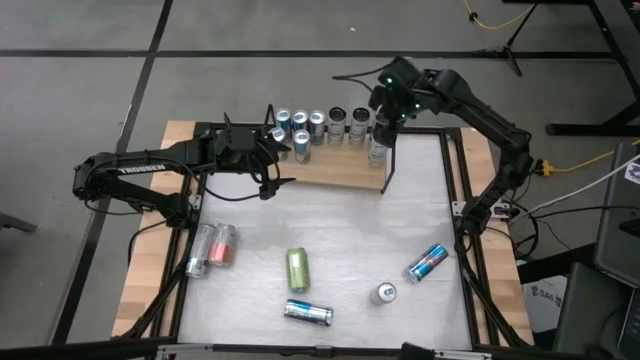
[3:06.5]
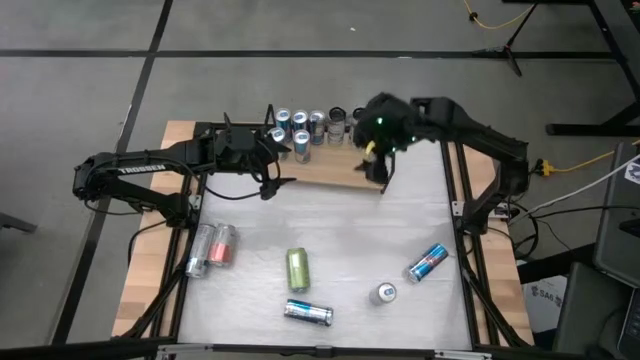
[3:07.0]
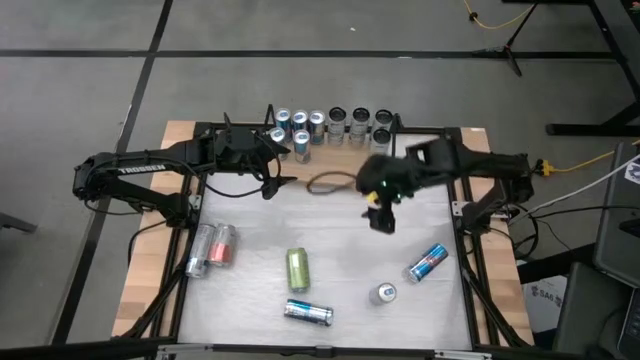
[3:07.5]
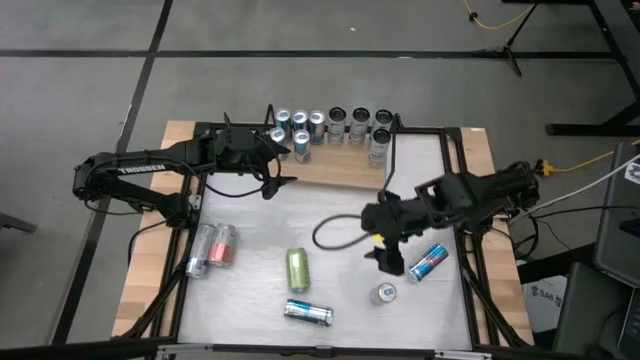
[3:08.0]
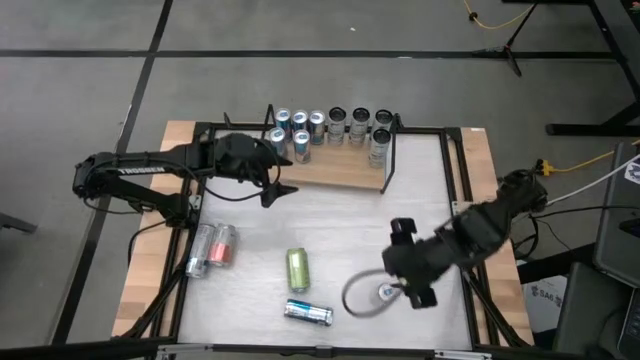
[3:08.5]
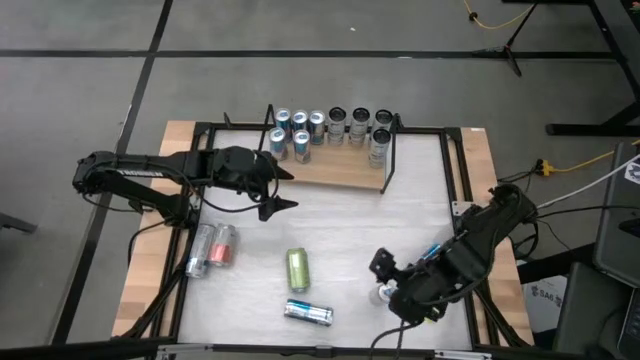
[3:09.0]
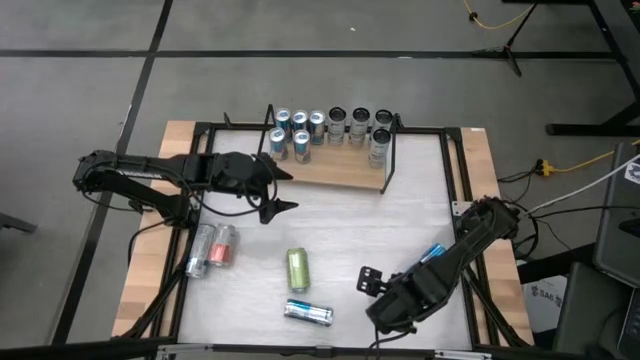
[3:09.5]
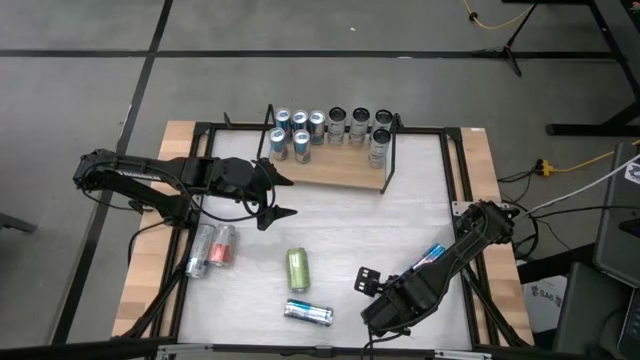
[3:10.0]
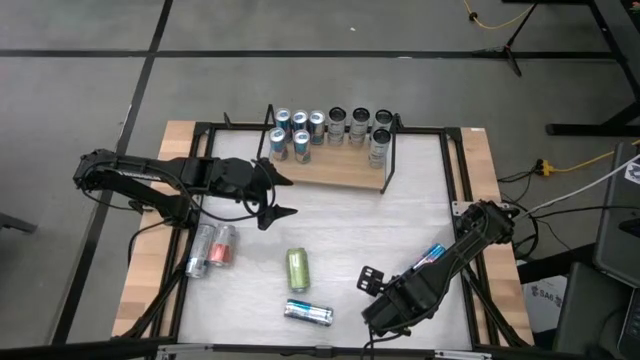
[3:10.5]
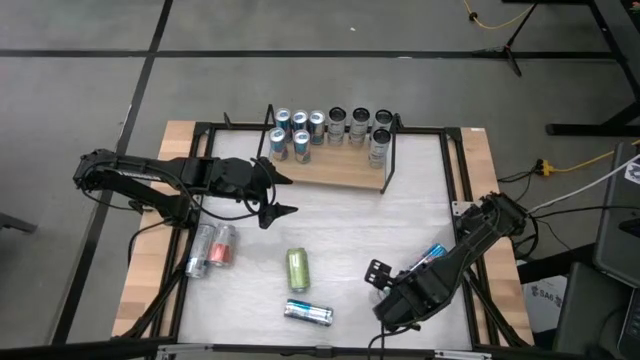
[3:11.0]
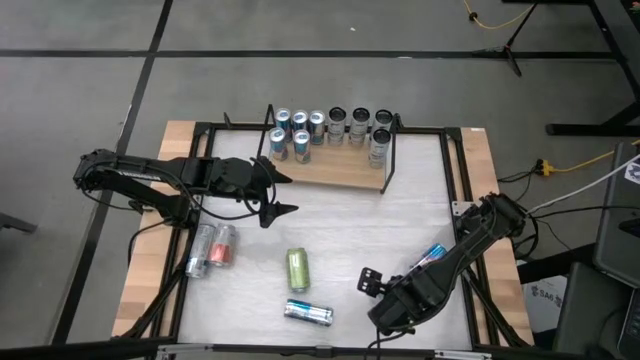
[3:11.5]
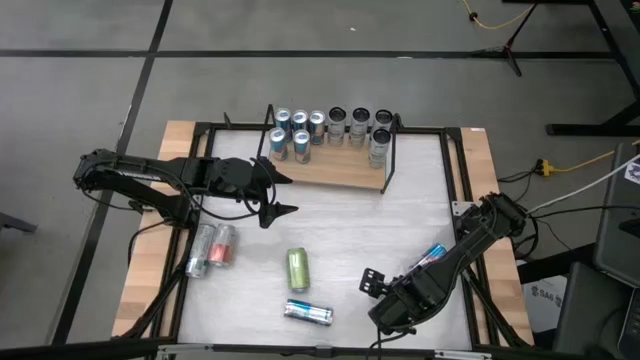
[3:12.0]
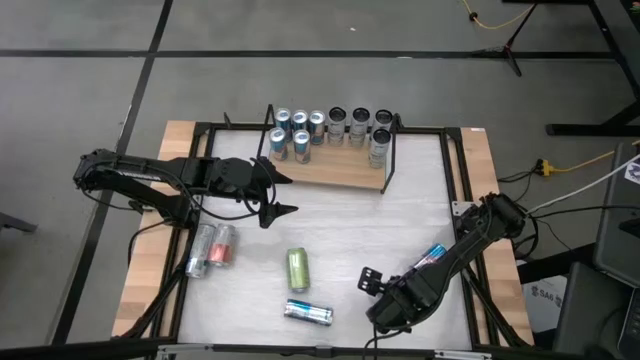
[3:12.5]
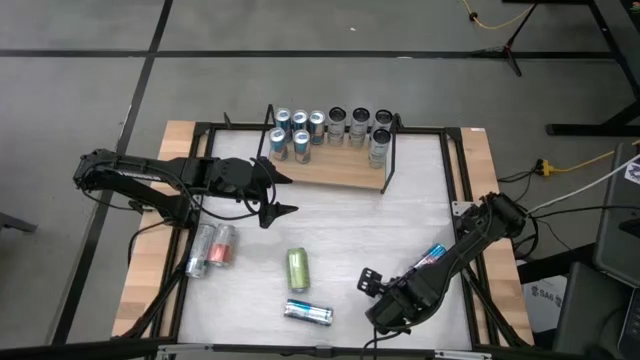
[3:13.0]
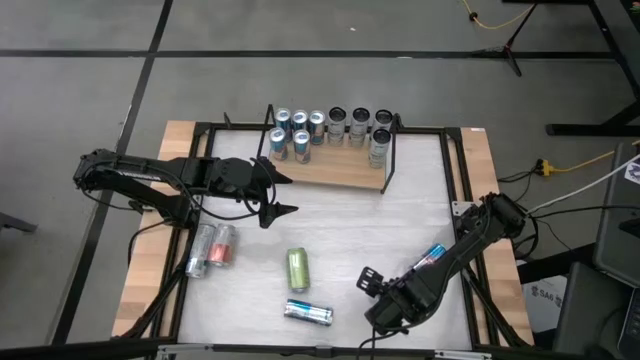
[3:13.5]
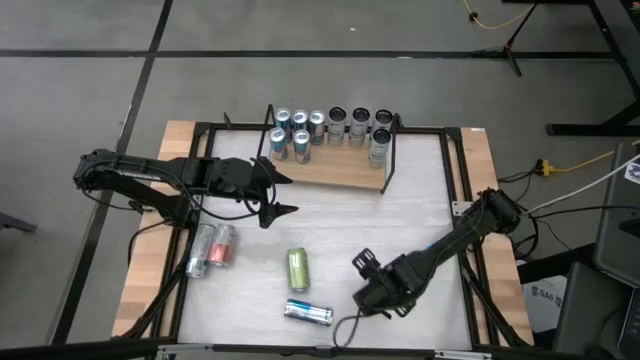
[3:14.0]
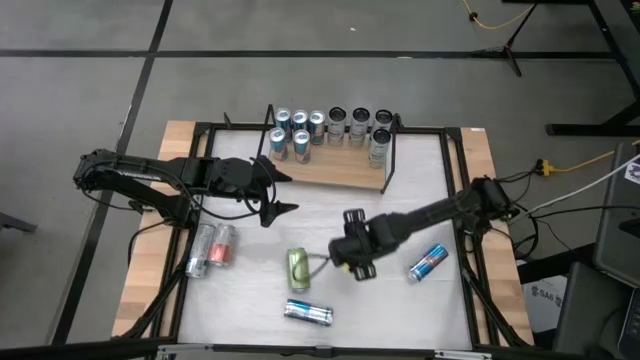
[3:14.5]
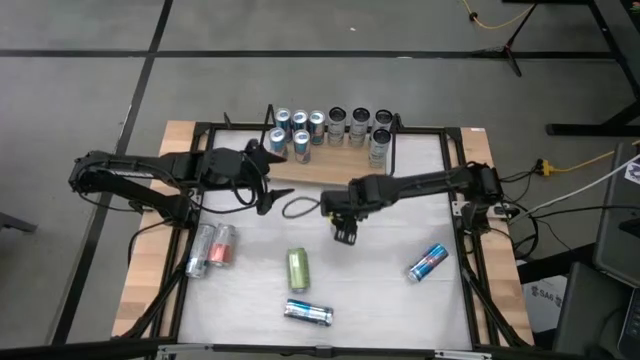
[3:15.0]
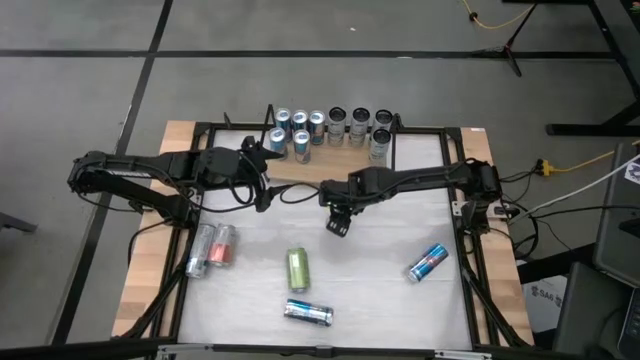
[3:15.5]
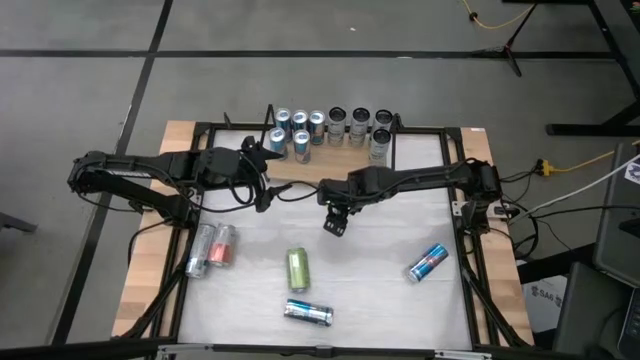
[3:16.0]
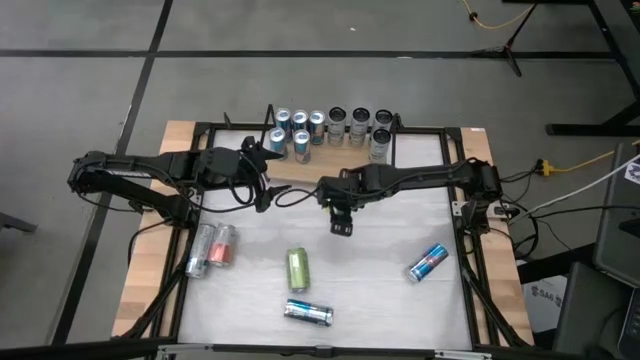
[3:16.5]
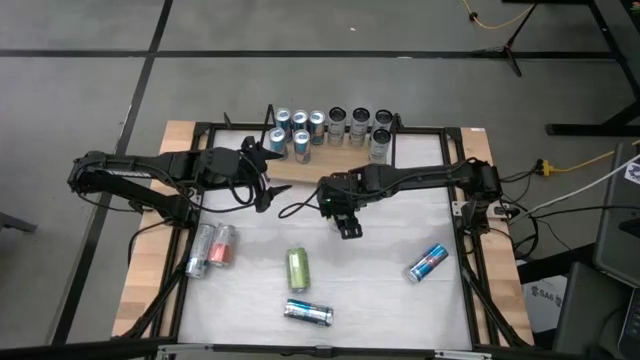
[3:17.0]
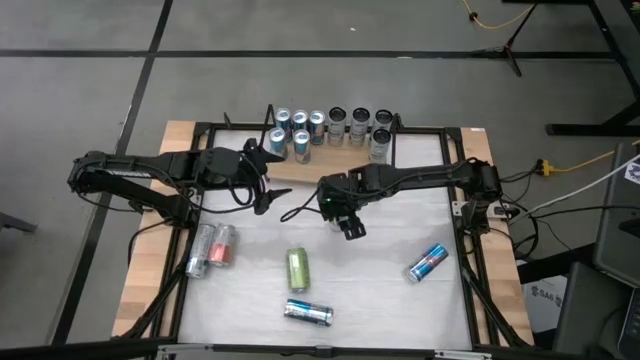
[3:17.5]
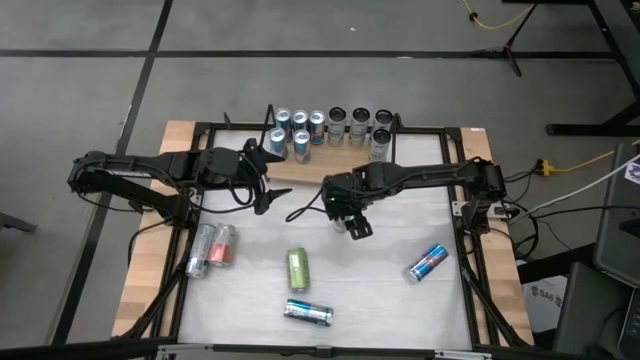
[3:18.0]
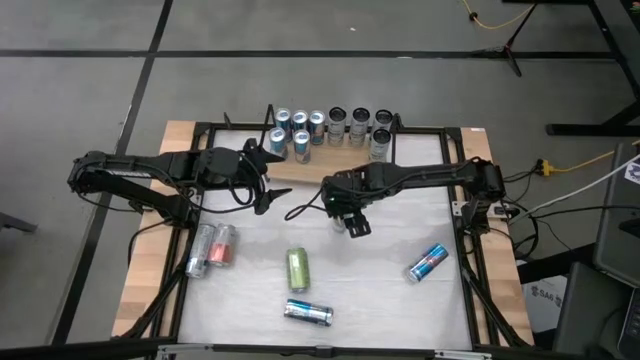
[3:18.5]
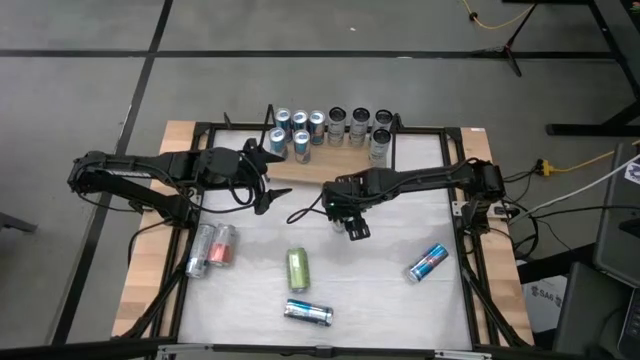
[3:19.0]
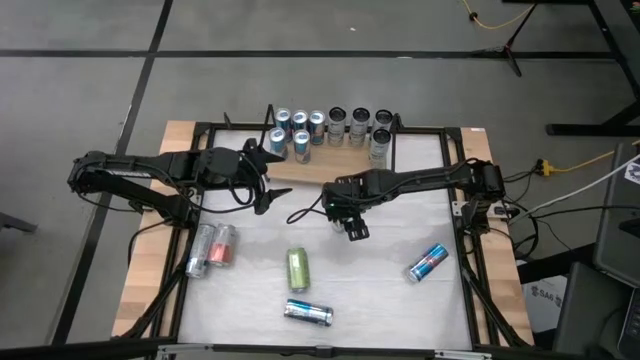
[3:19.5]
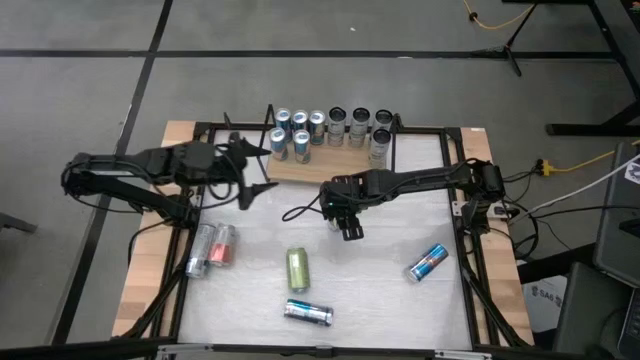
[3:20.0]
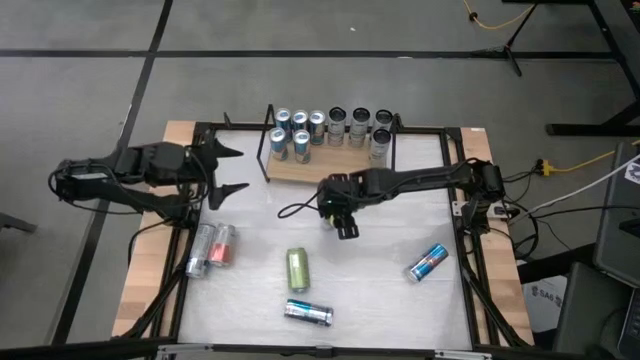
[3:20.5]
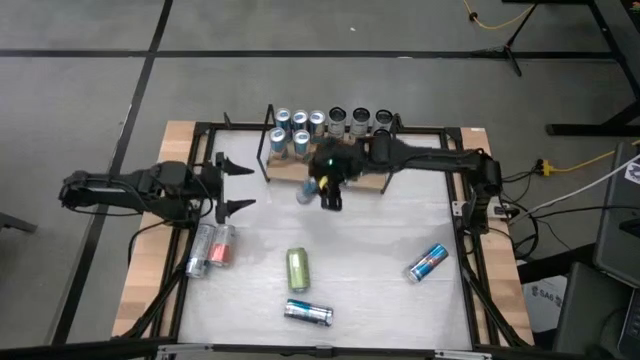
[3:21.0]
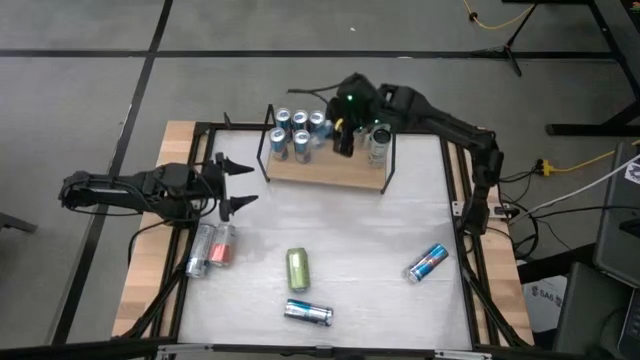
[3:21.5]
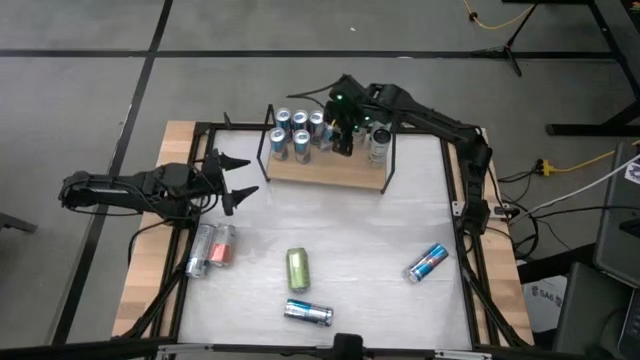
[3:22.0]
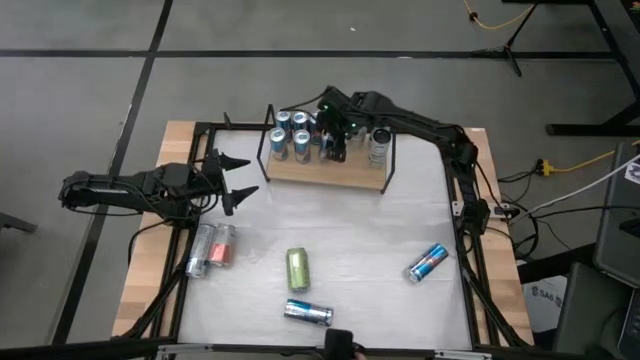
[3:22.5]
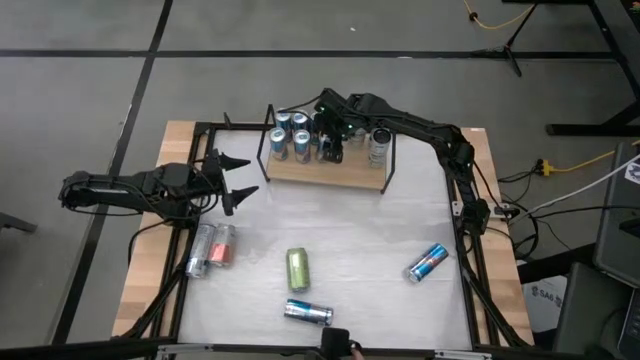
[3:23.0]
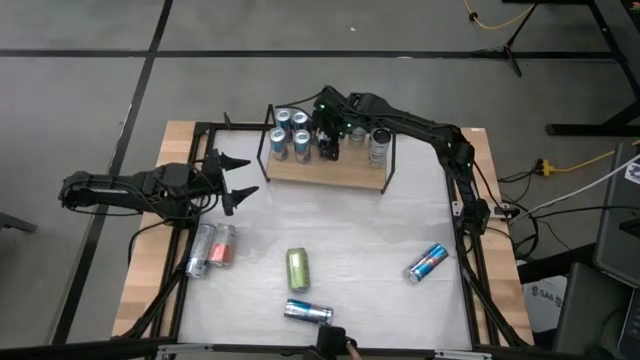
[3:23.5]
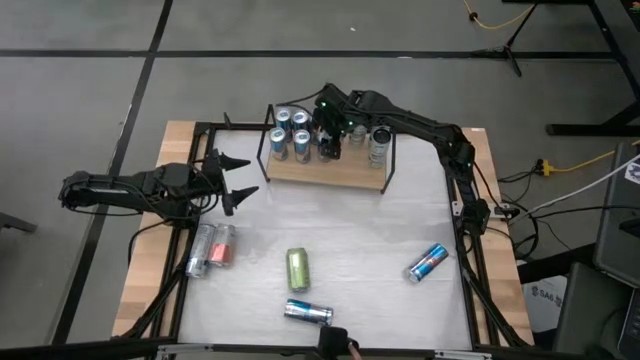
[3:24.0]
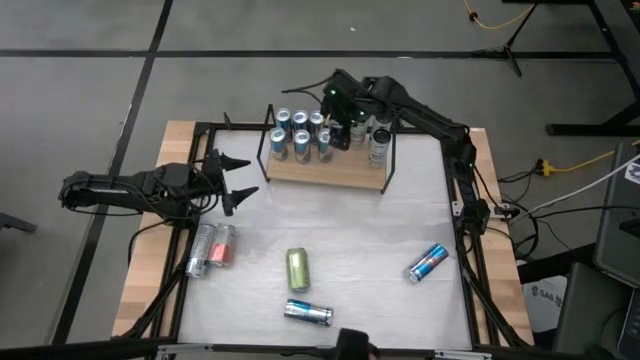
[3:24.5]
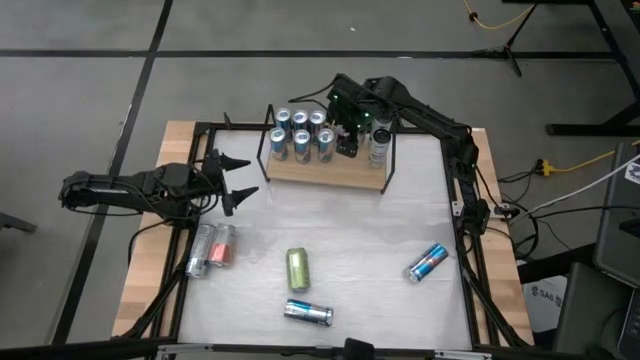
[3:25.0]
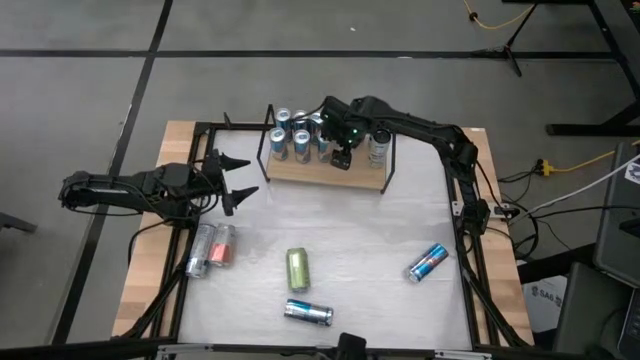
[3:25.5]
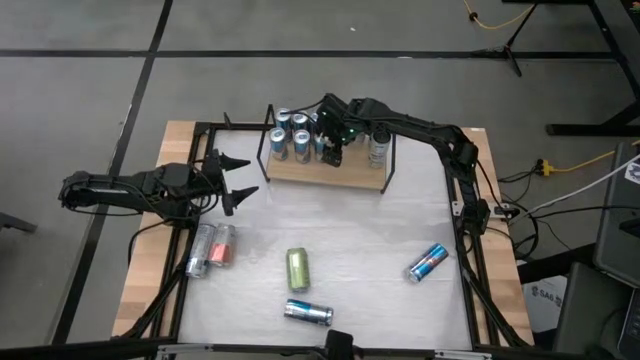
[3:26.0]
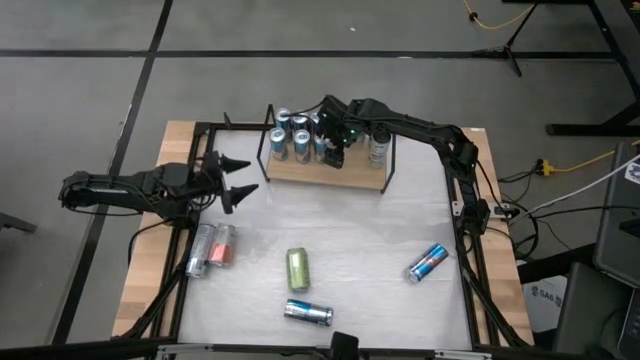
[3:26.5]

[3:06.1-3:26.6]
Task: Place canned beverage on shelf
Put the blue soda can on the shelf aligned with the other blue soda can

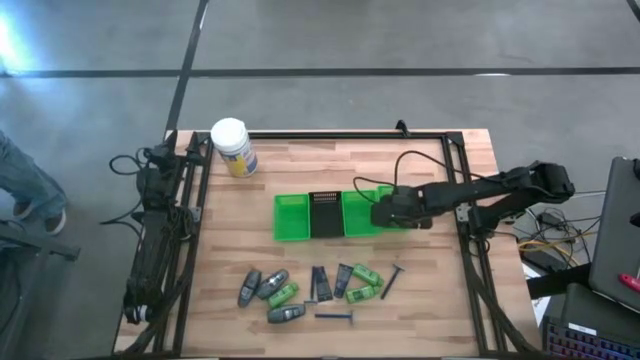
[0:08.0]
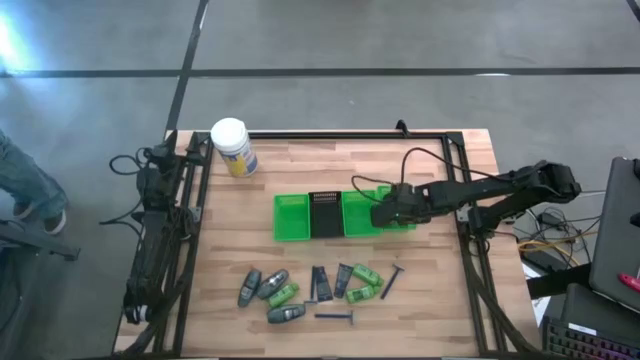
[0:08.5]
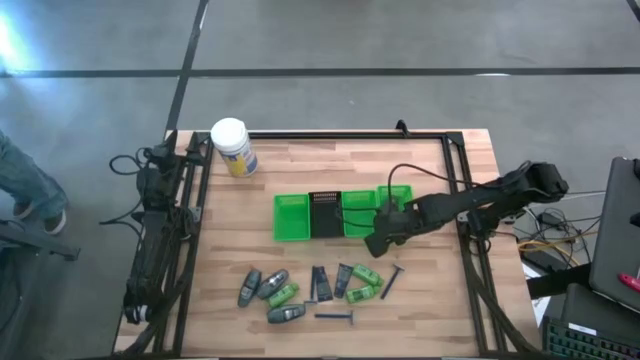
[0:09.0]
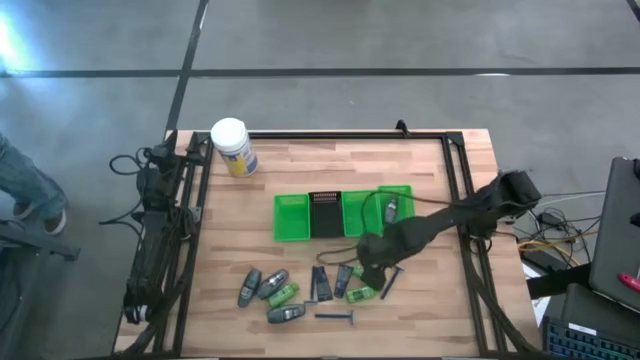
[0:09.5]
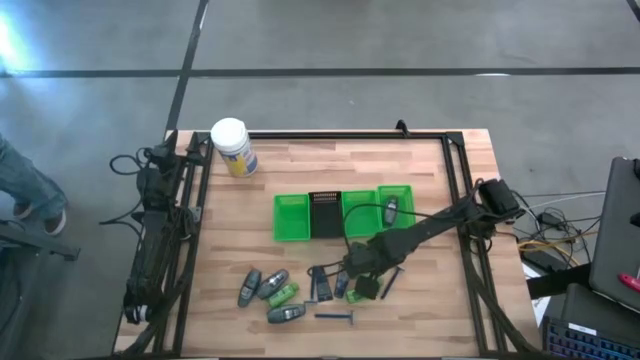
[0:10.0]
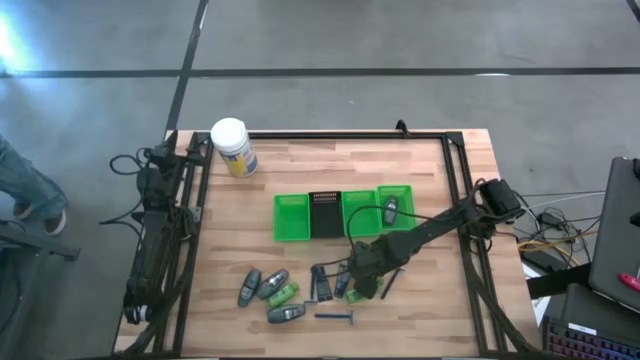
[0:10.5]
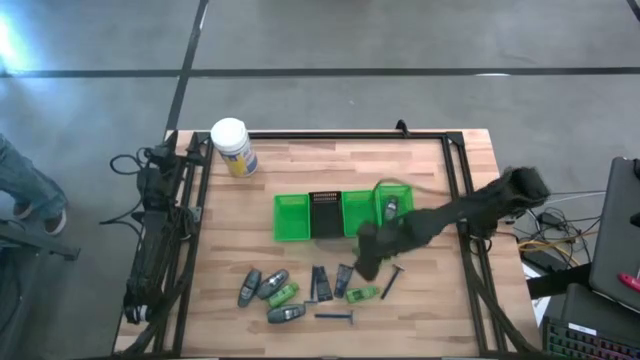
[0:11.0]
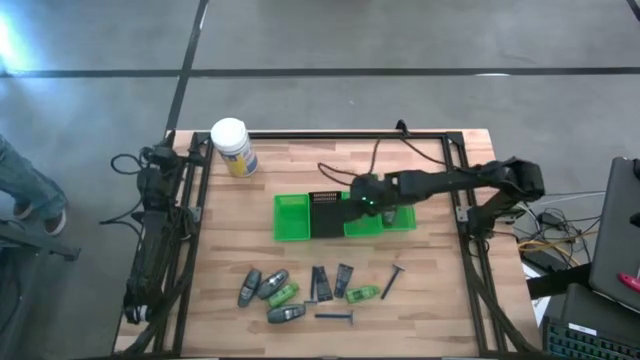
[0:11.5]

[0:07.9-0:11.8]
Task: Pick & Place Travel size toiletries
Put the green shampoo into the middle green basket
